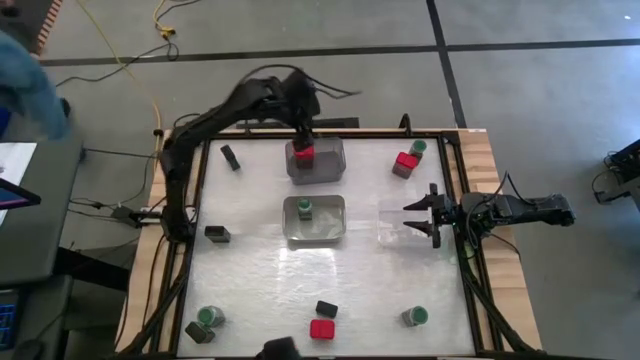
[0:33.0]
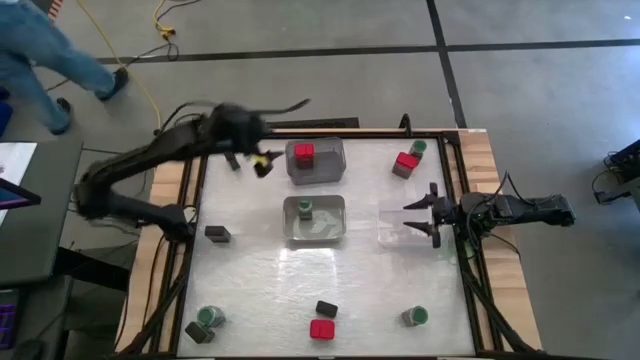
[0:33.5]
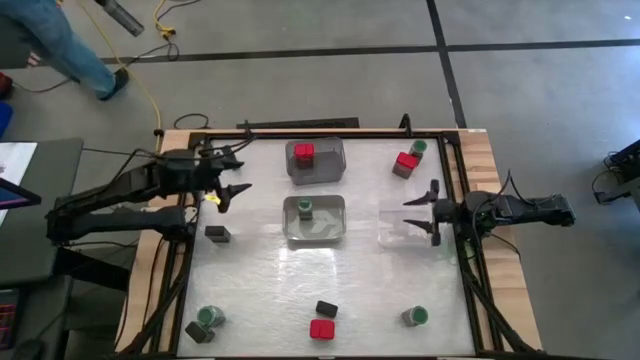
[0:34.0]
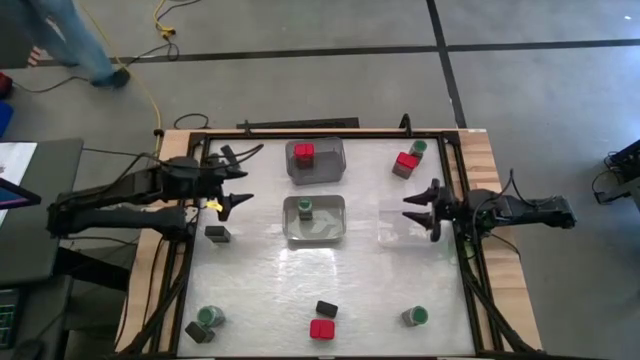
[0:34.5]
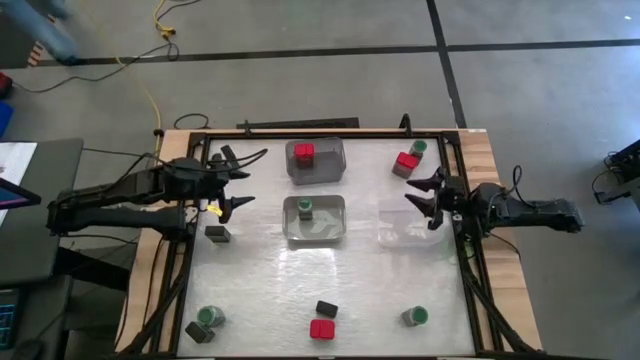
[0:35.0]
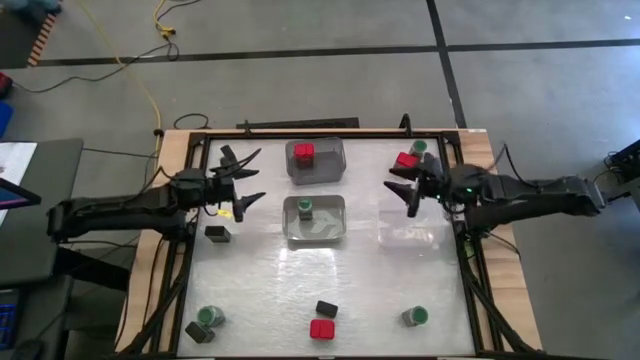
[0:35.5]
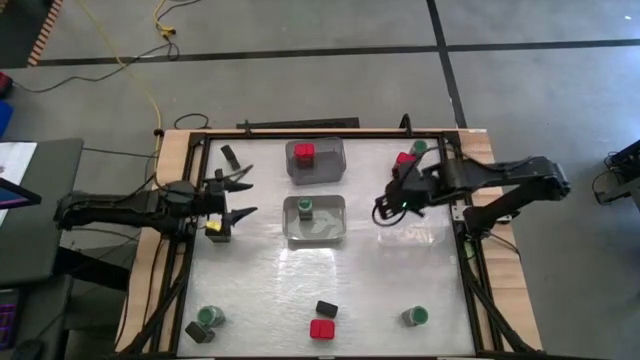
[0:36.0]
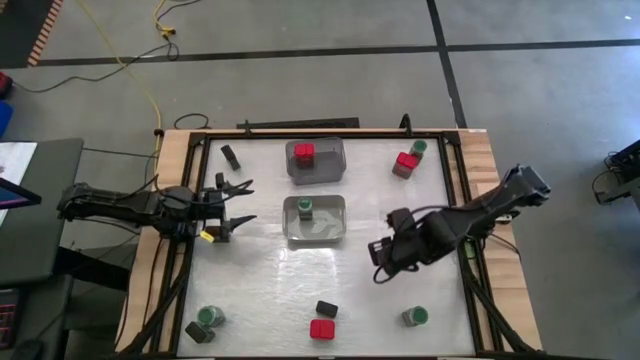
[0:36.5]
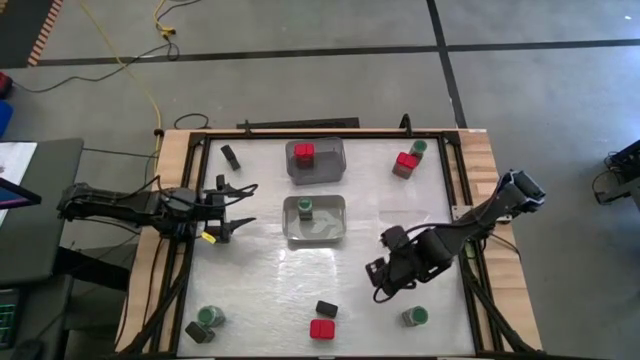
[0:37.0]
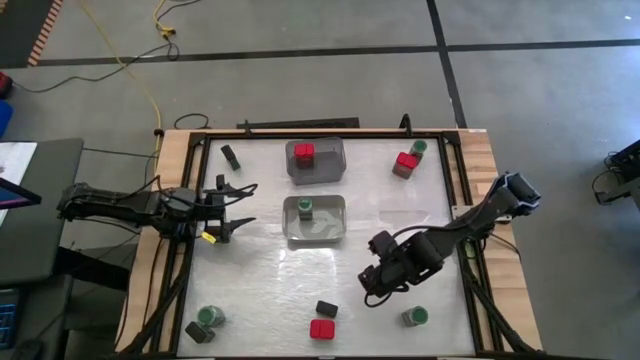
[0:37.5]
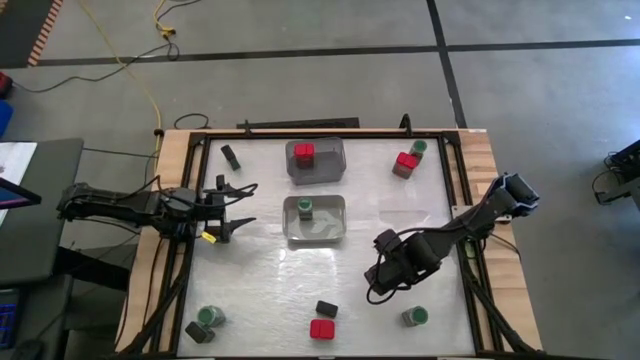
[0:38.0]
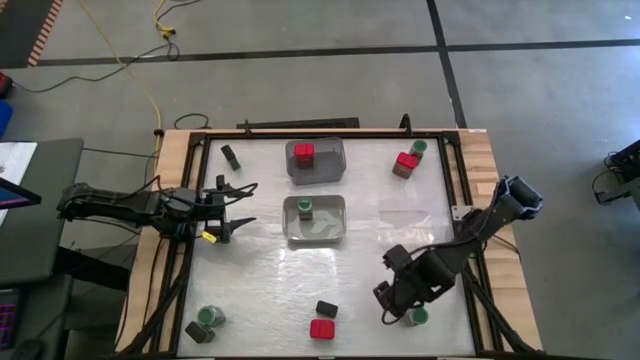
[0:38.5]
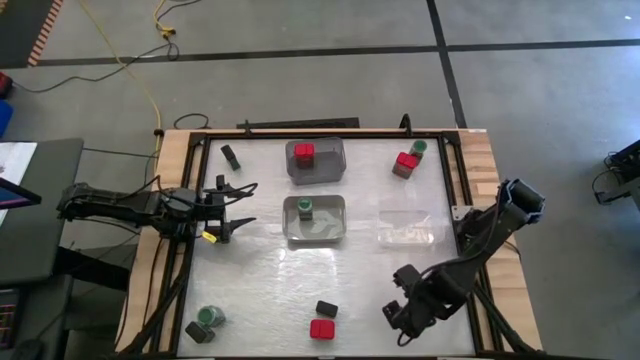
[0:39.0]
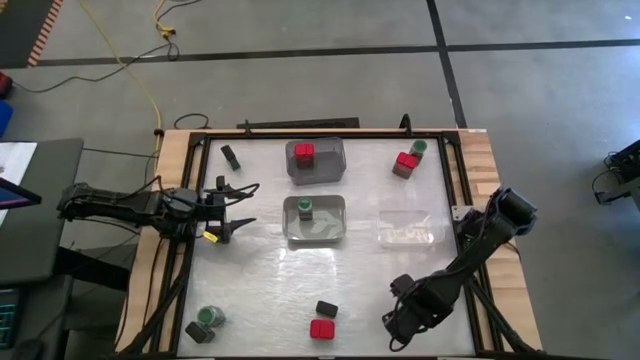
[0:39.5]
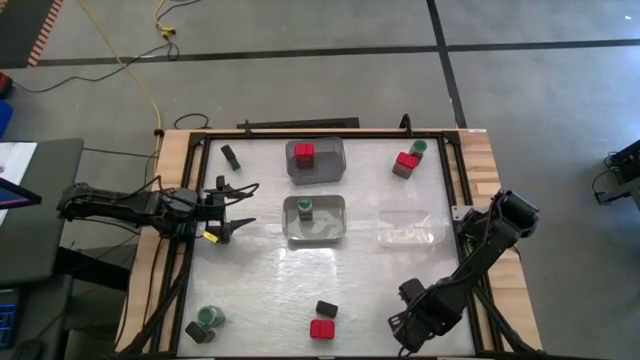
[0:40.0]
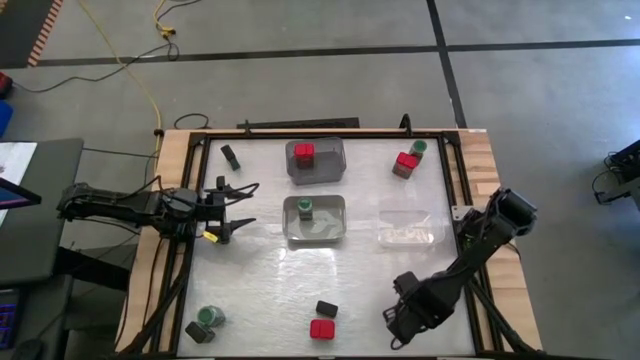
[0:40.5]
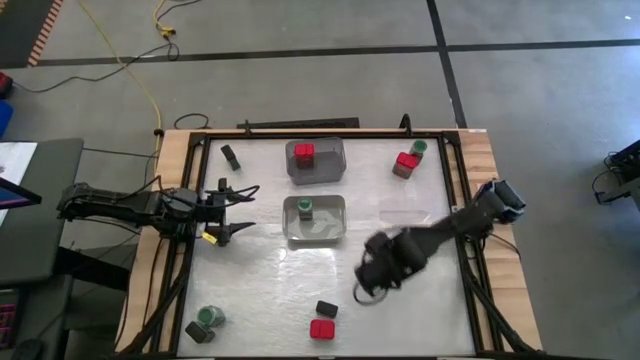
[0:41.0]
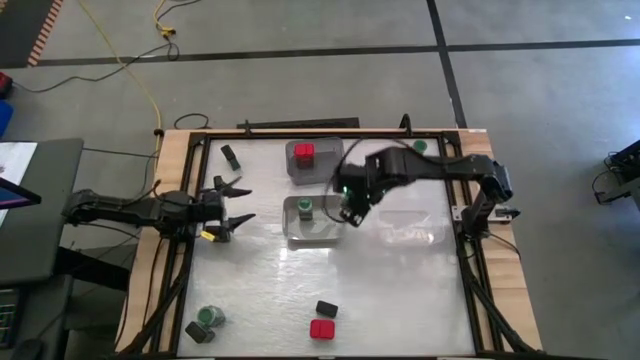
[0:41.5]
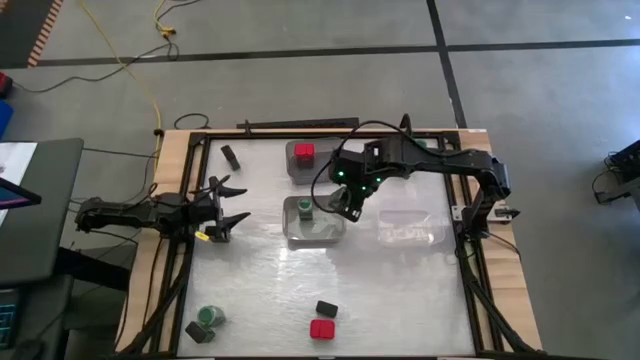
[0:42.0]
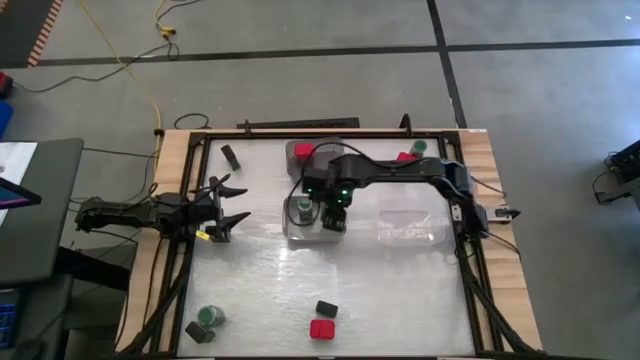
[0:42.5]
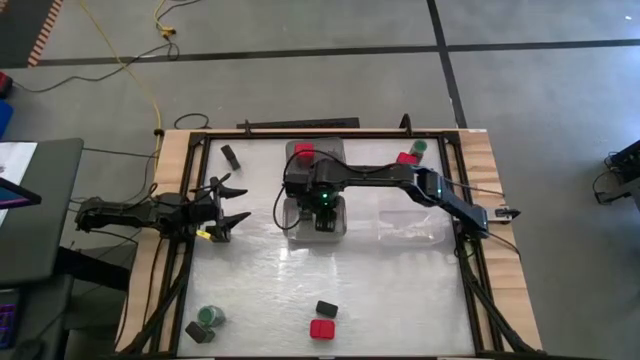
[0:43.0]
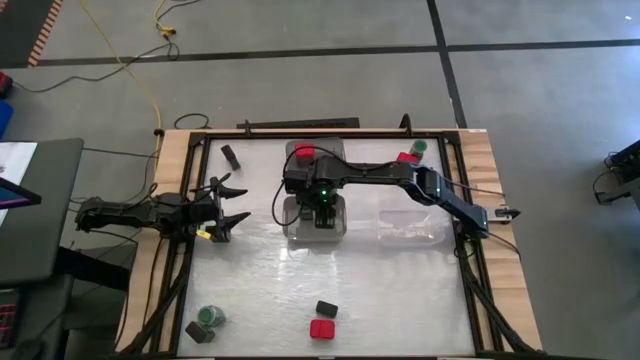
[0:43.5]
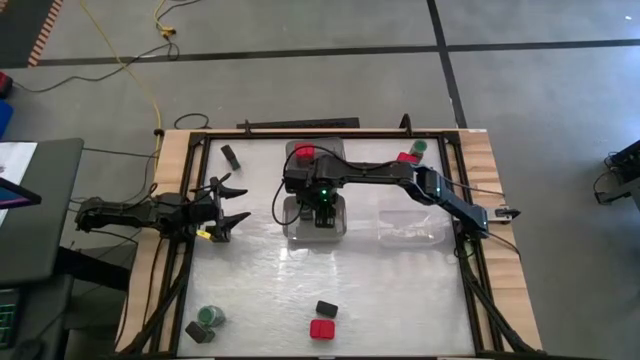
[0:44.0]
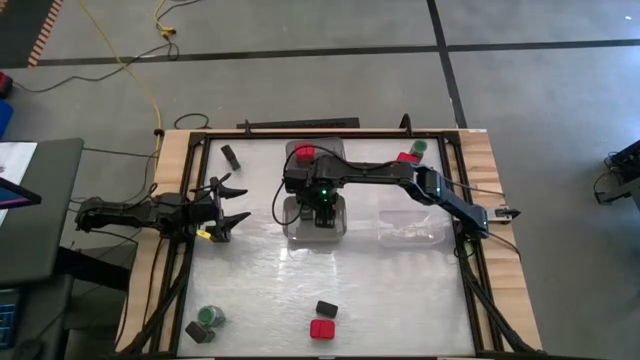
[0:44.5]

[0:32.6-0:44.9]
Task: Sort spices by type
Put the green spice bottle into the gray bin

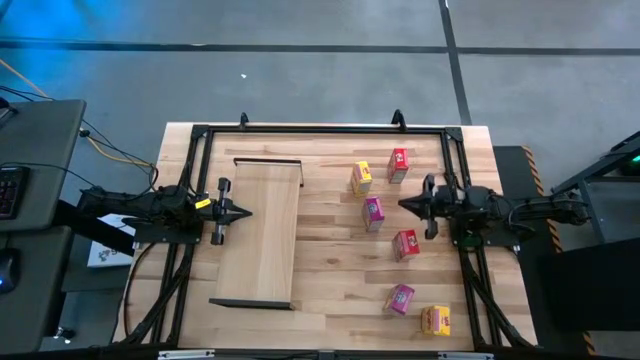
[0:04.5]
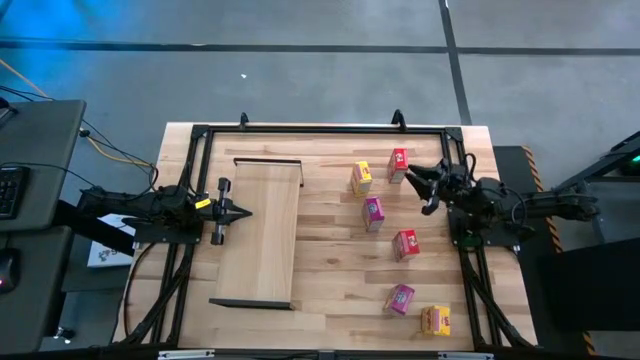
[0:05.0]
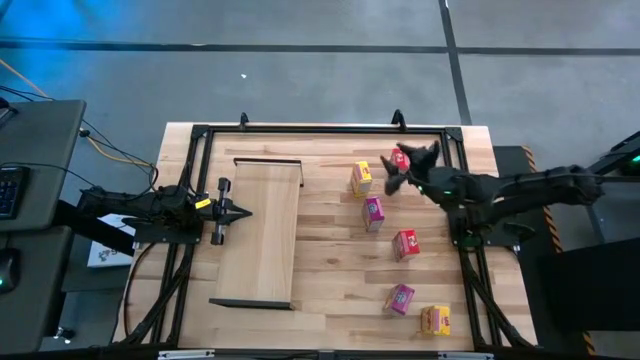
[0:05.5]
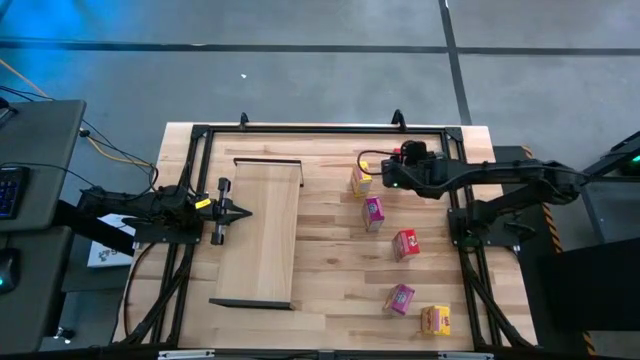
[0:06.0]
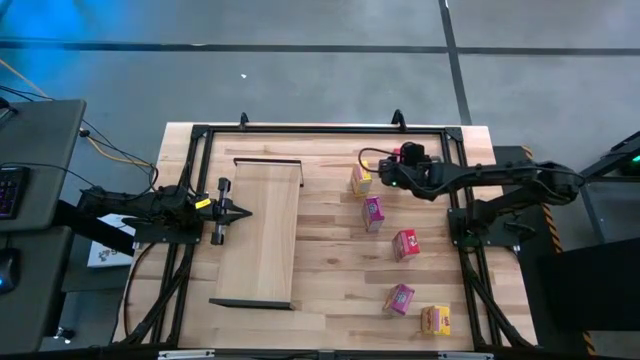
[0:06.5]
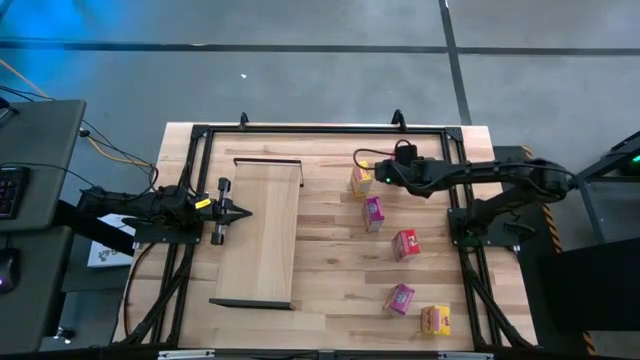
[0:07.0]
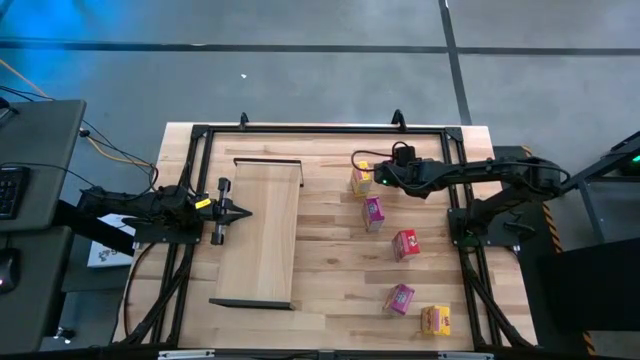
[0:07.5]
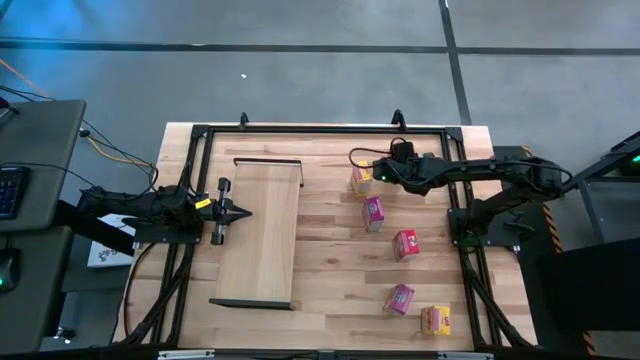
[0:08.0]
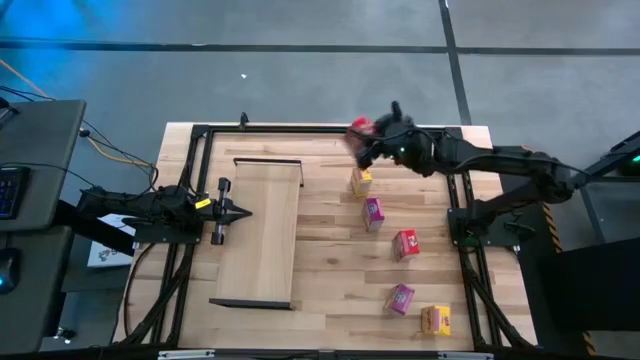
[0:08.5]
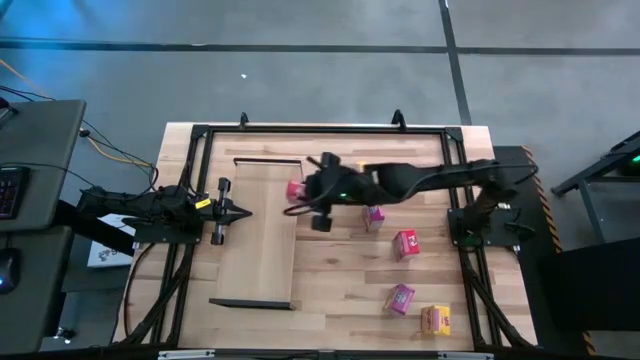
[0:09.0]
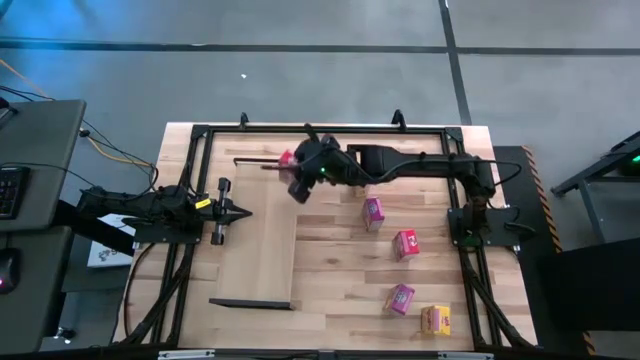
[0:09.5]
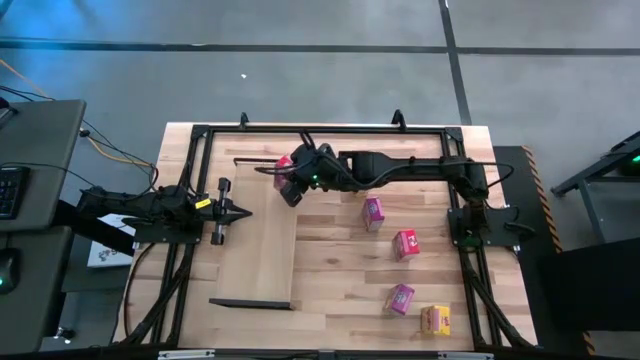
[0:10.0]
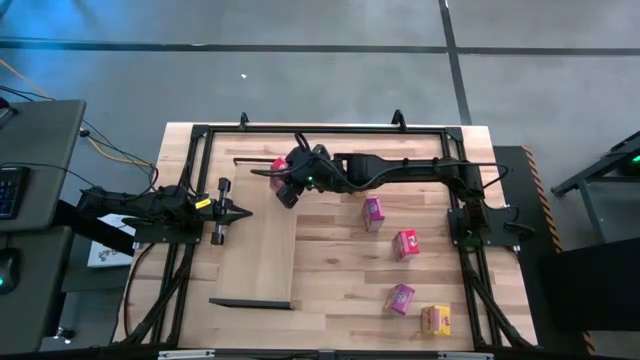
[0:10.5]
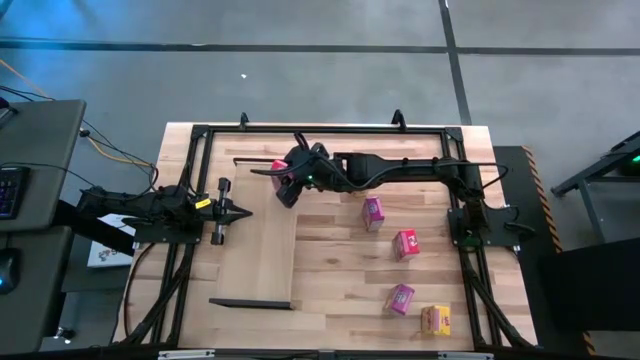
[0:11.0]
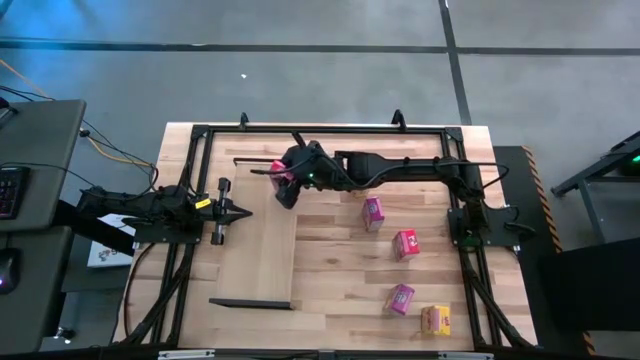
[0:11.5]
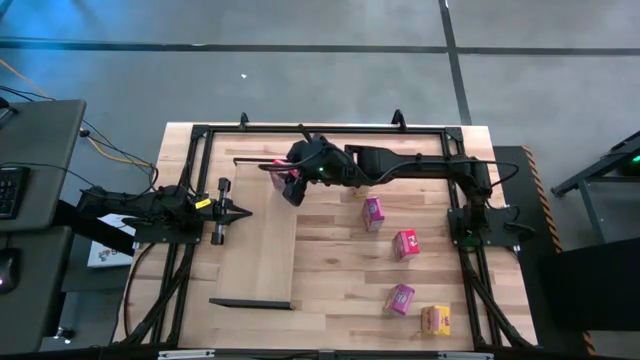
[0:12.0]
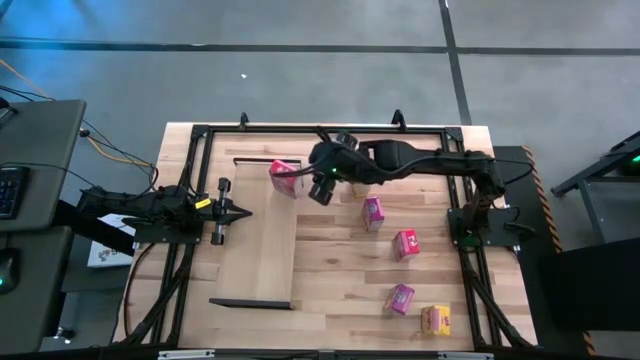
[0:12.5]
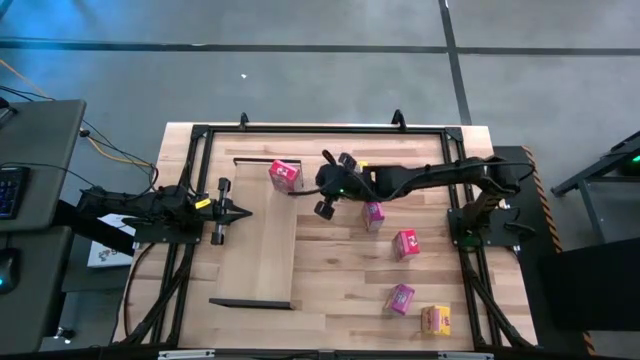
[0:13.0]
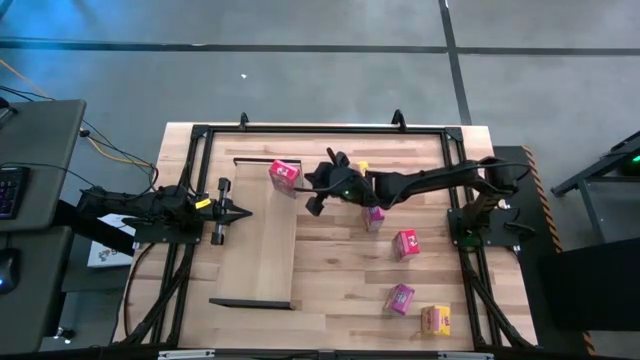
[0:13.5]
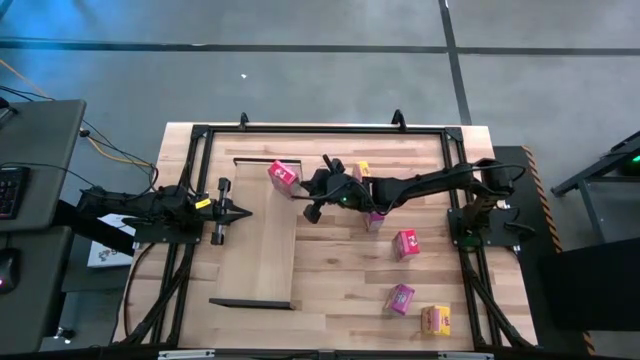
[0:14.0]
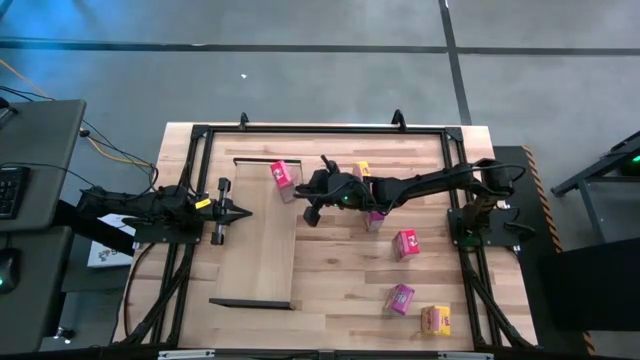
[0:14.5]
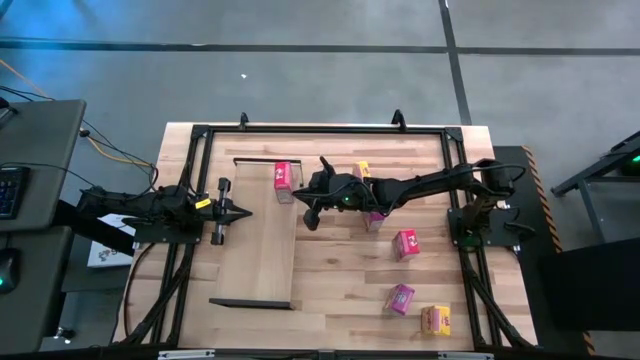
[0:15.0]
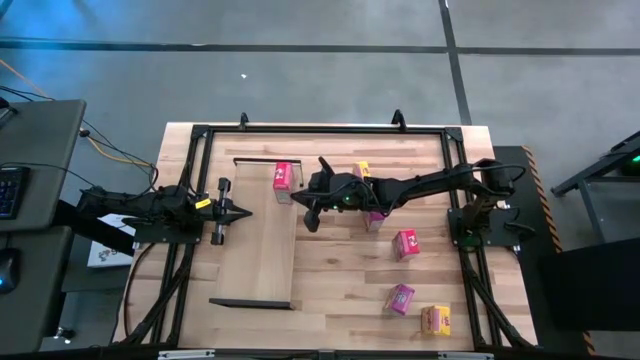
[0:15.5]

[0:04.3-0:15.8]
Task: Stack cereal on shelf
Put the top red cereal box on the shelf
